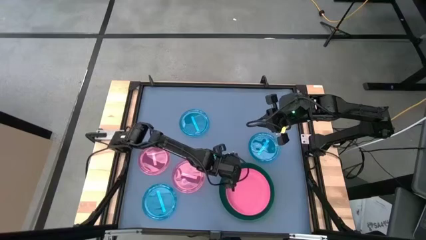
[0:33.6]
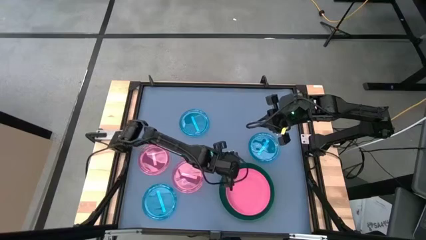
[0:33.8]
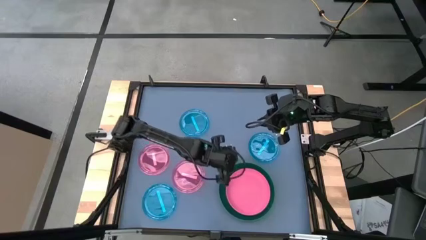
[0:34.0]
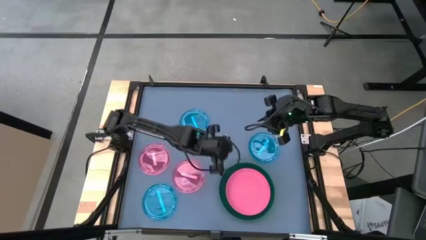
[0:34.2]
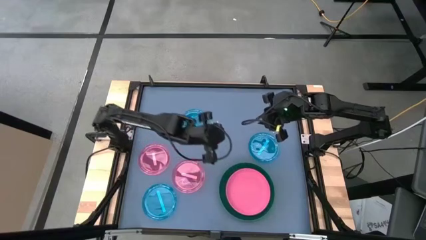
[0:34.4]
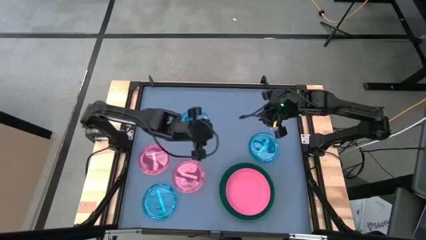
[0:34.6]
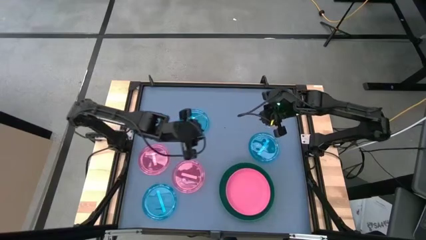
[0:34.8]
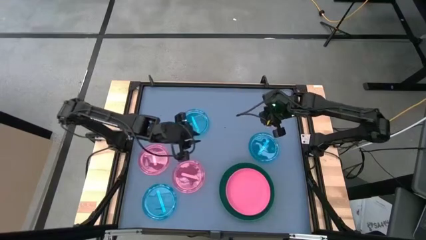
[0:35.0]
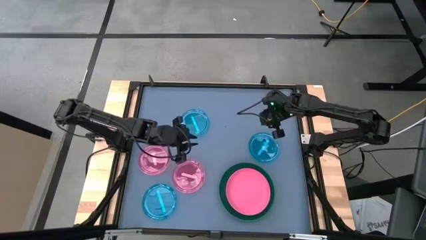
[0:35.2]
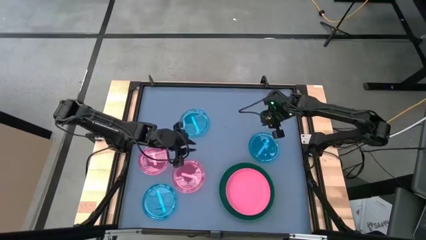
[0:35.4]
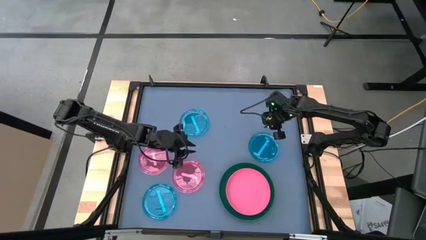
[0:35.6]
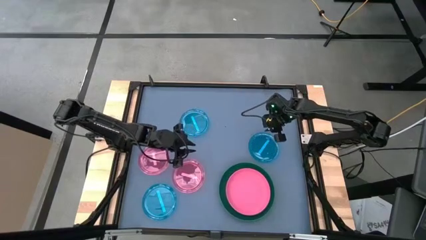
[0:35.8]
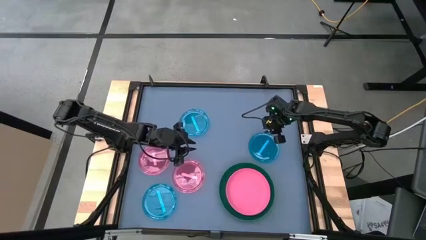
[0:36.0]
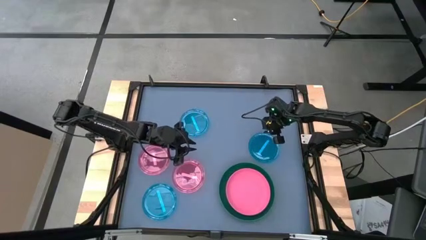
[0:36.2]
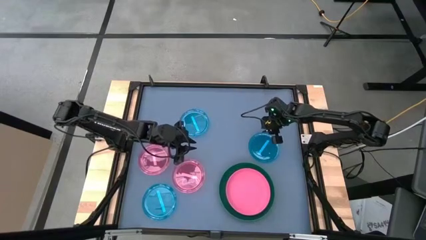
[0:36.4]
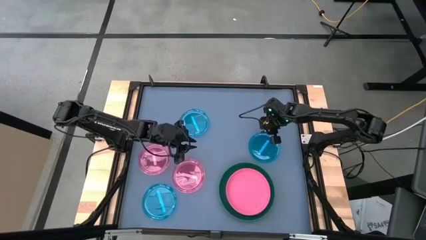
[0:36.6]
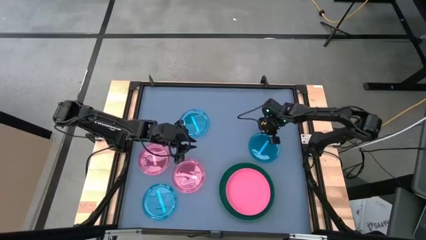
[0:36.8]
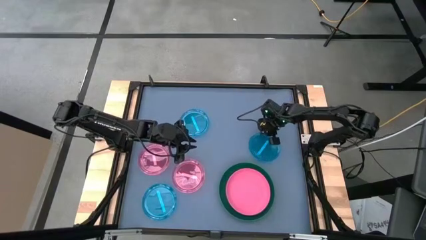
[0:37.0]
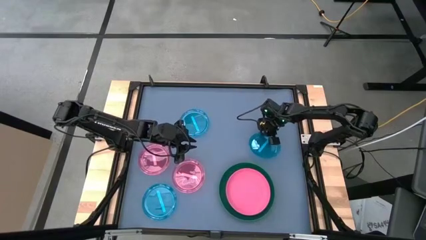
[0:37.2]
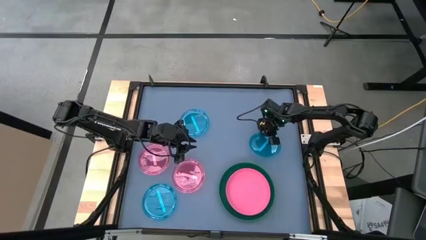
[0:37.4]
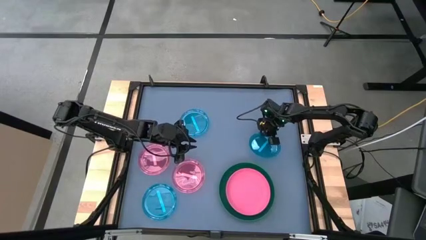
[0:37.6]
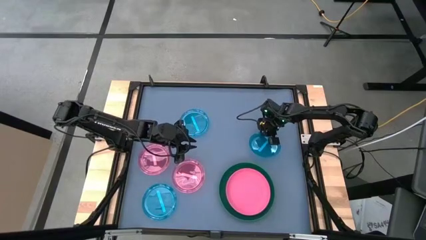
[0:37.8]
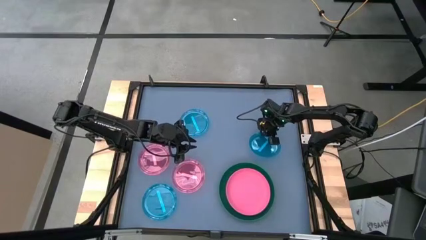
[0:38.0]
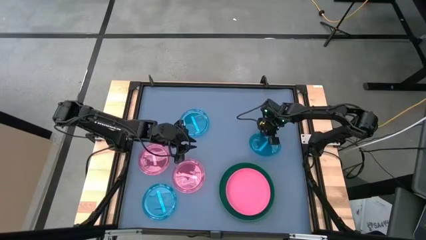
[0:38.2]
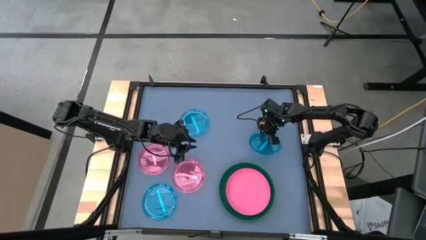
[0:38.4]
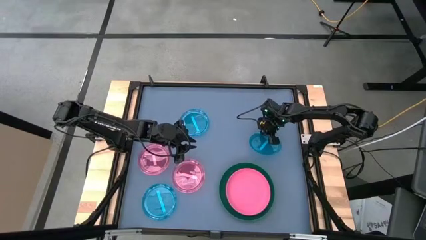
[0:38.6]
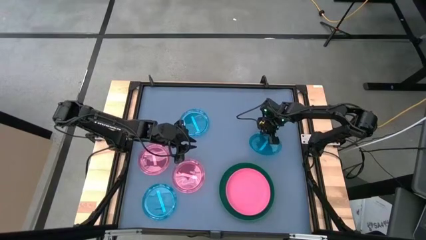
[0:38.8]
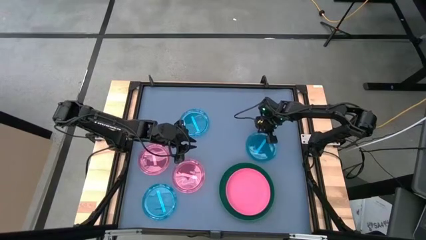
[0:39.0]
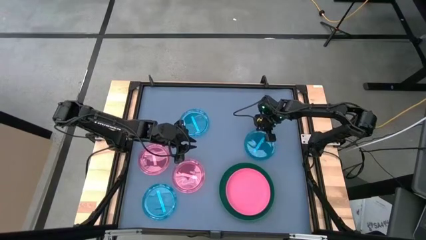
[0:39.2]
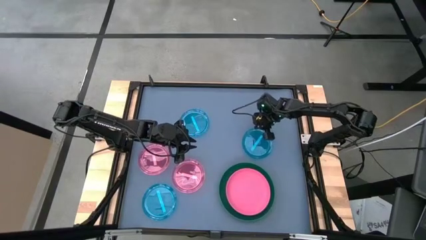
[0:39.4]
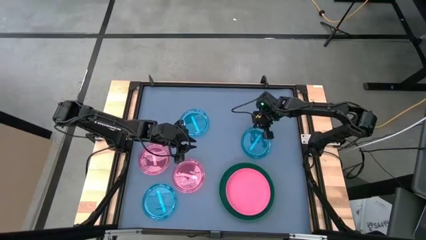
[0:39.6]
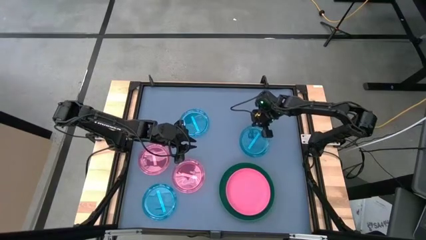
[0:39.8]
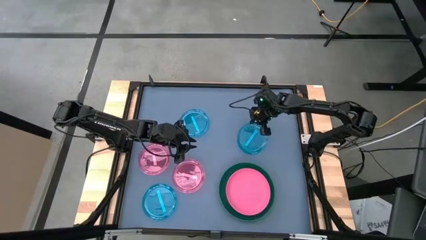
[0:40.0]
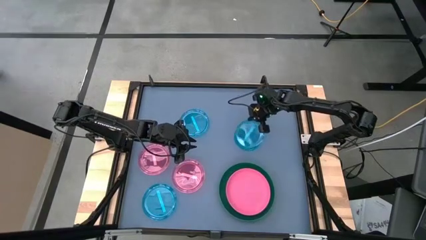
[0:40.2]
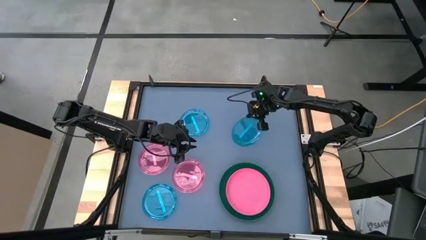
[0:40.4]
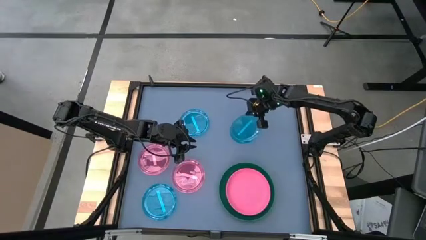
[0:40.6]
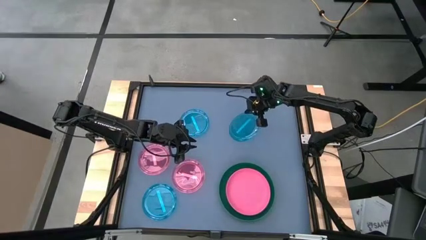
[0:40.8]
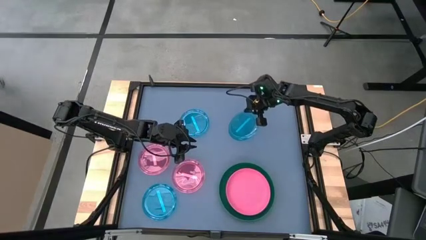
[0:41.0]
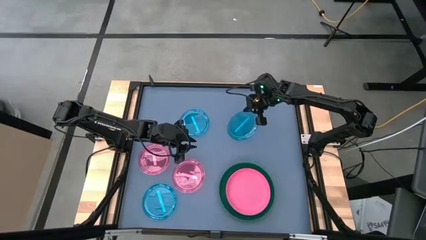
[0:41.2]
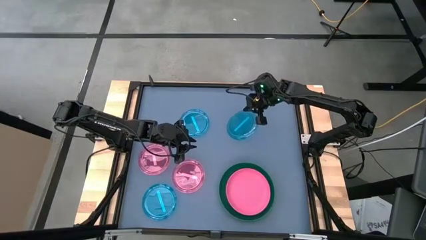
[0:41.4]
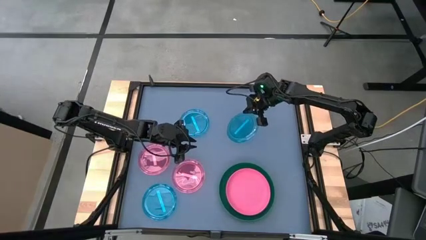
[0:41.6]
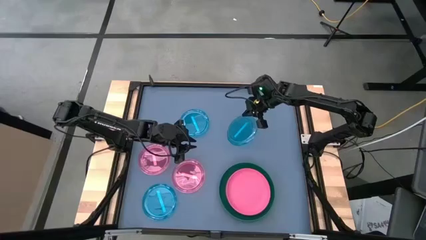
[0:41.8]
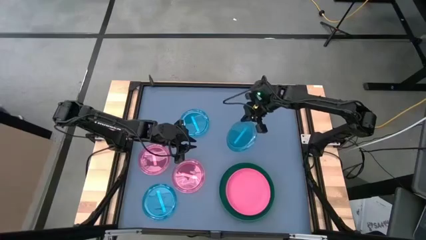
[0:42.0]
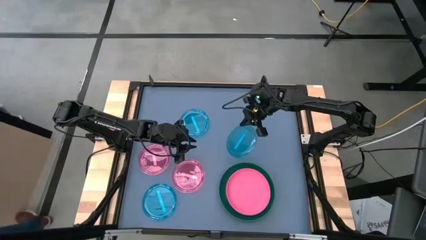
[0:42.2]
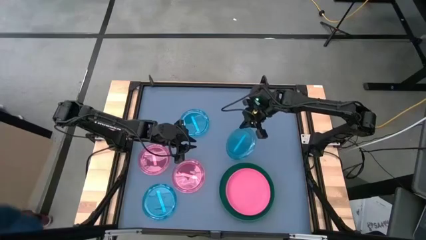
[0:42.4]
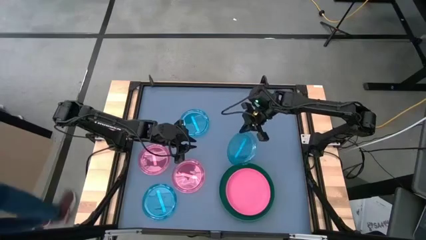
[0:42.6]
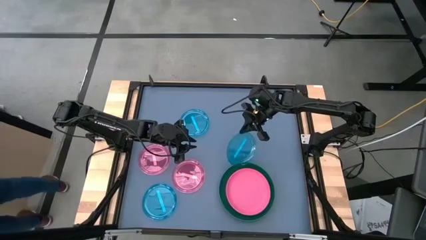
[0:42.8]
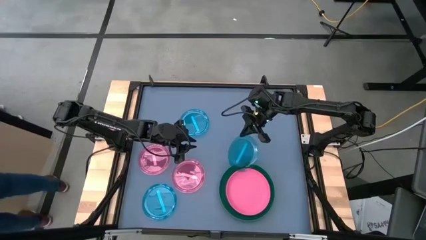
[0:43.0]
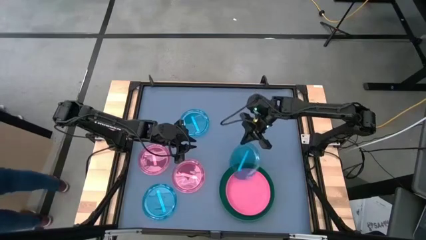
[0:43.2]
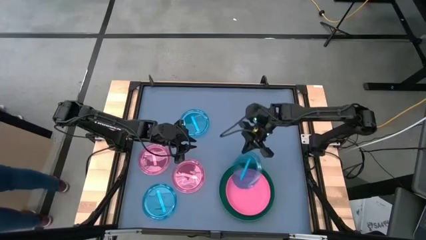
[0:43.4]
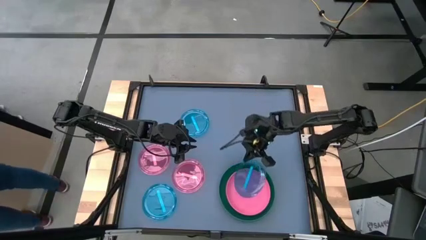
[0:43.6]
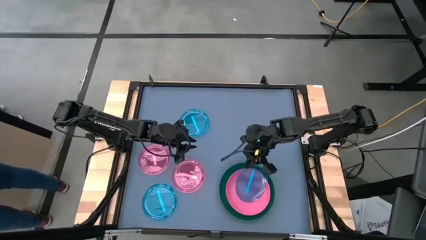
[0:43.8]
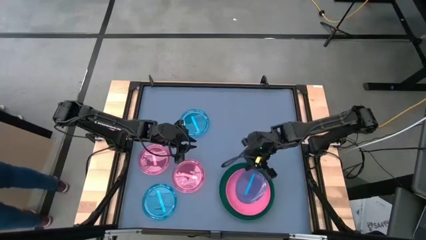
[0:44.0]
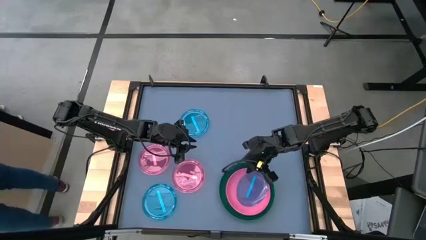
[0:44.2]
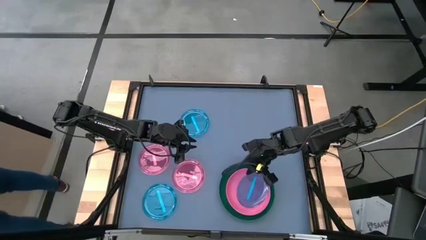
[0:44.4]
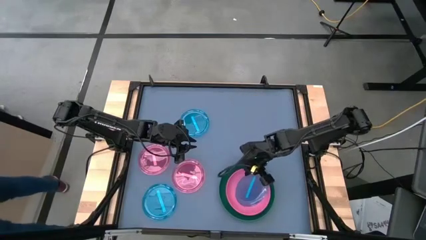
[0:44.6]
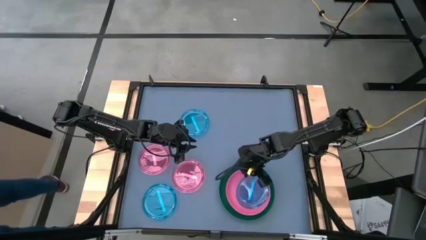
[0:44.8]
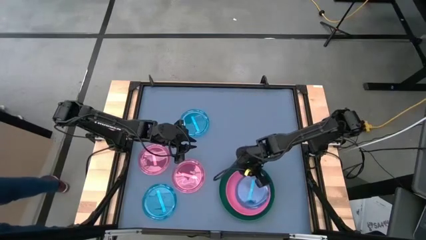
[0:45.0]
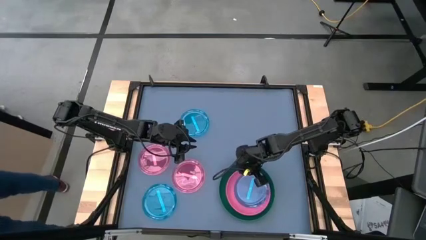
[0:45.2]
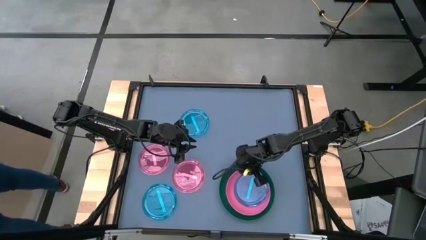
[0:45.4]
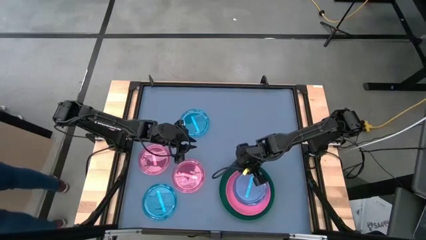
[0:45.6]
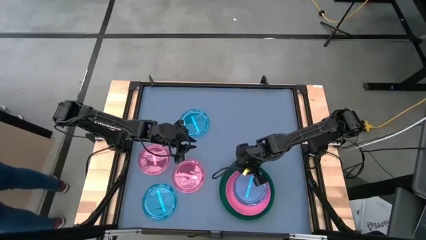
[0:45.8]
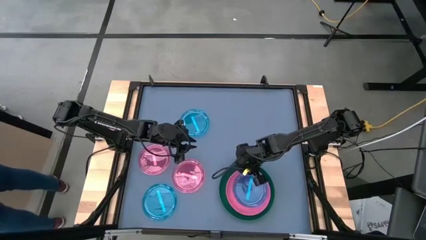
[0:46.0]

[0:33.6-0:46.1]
Task: Stack plastic plates
Stack the top right blue plate on top of the pink plate

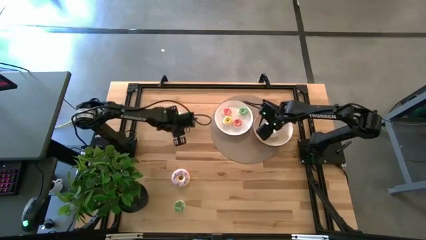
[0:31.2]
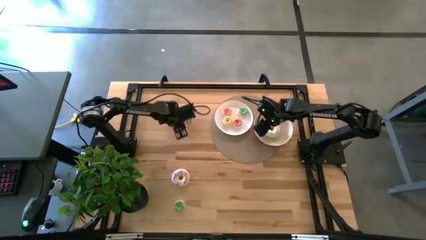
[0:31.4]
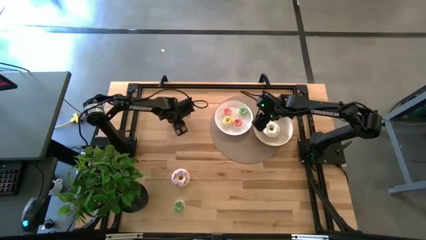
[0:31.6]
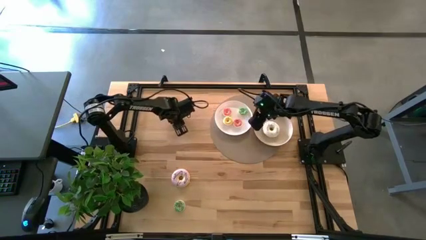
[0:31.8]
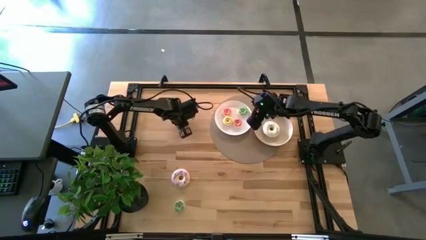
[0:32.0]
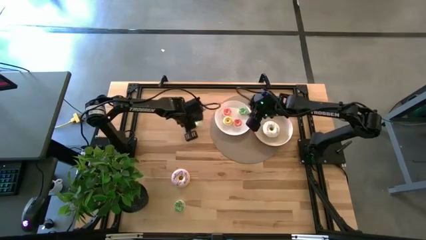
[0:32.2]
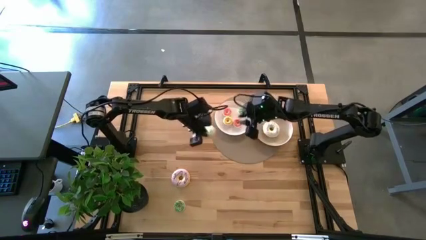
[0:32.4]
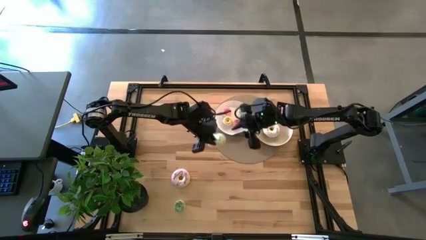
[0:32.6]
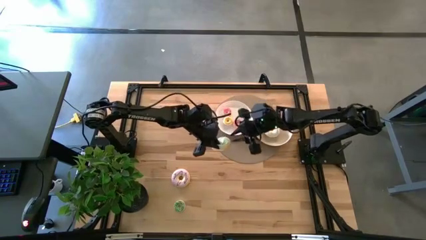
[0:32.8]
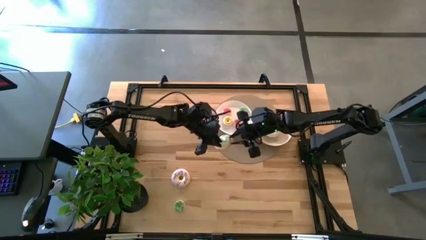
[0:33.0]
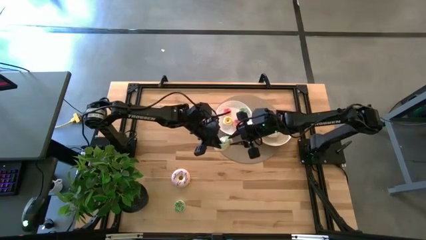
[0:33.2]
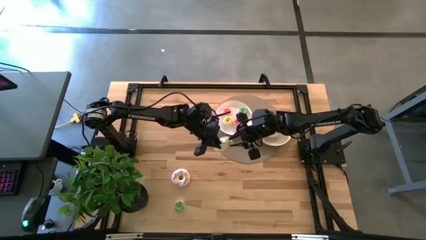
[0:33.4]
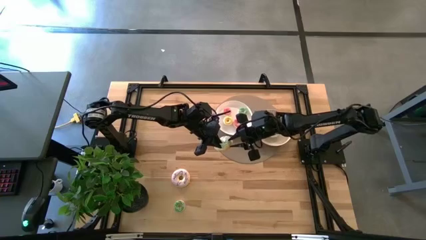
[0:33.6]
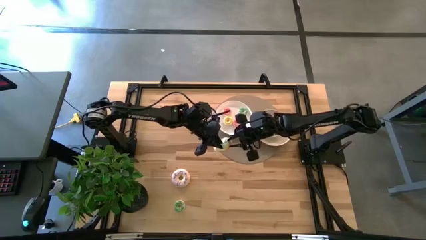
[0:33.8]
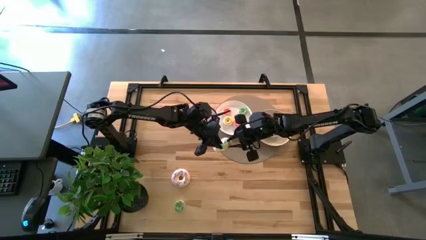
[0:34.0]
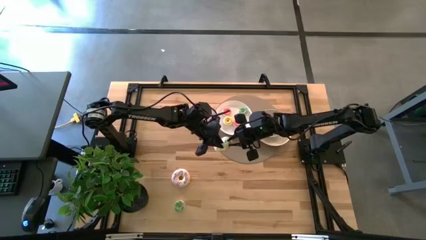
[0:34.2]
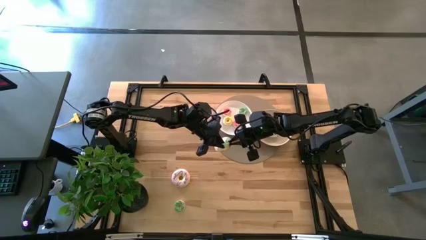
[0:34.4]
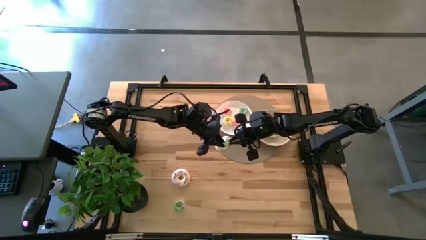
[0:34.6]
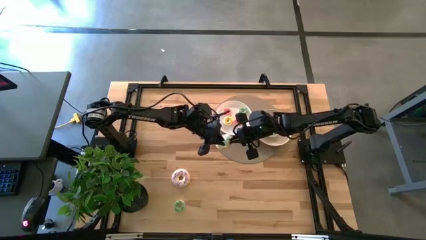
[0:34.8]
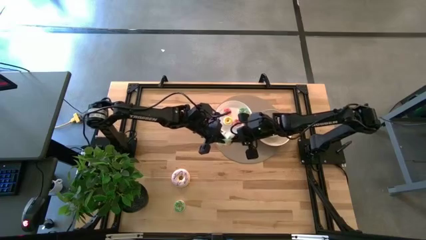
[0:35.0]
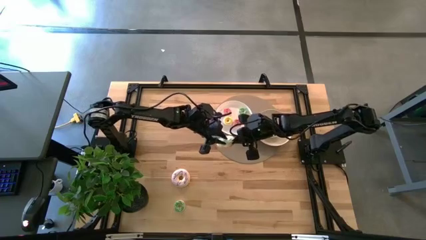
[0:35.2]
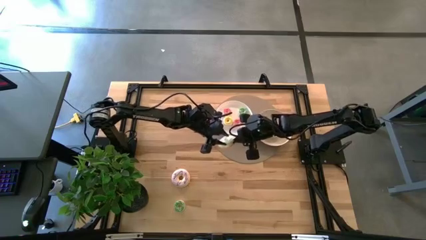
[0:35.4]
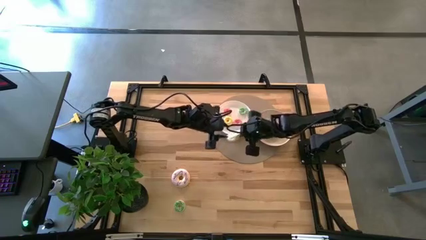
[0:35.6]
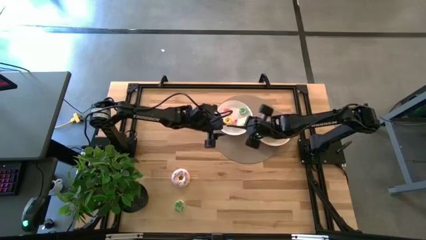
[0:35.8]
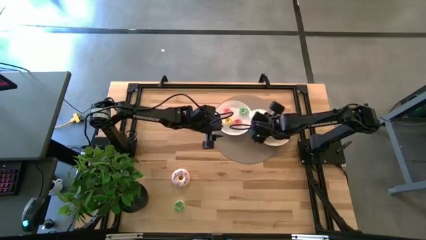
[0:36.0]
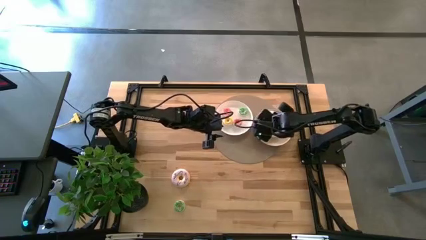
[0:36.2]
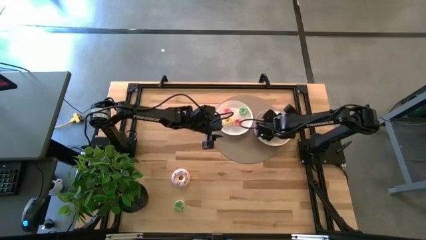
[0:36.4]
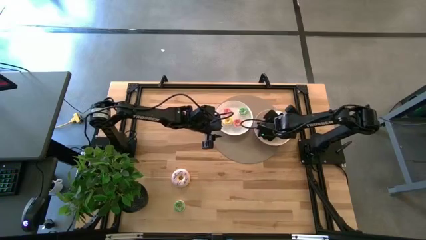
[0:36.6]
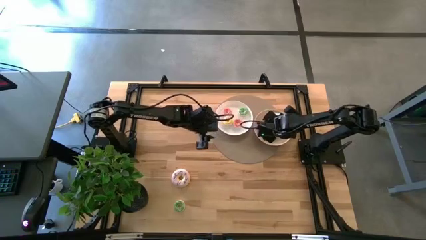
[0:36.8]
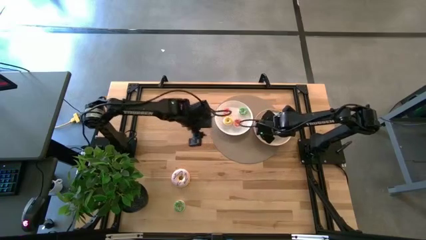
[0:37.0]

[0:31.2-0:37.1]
Task: Pick & Place donuts
Put the large blue donut on the brown plate
